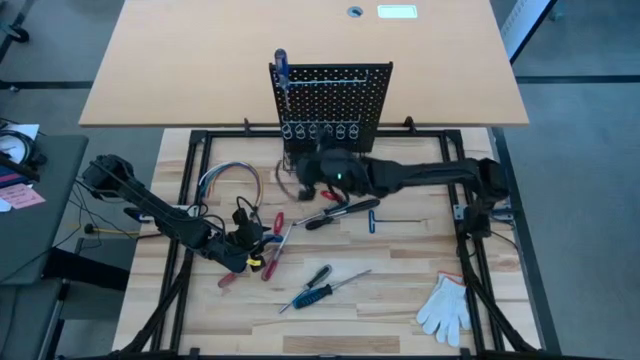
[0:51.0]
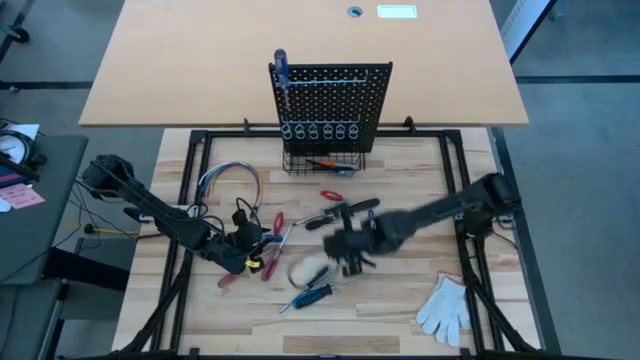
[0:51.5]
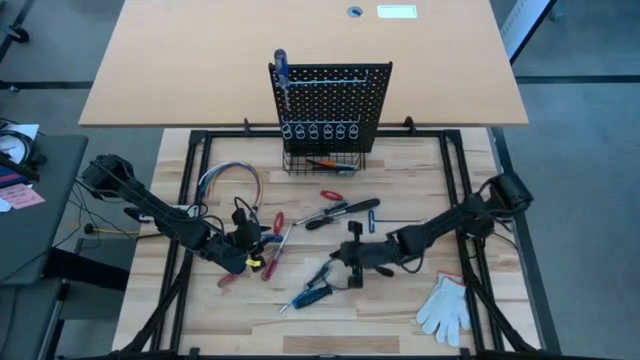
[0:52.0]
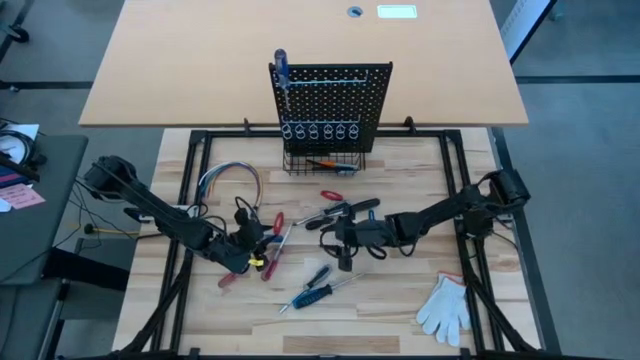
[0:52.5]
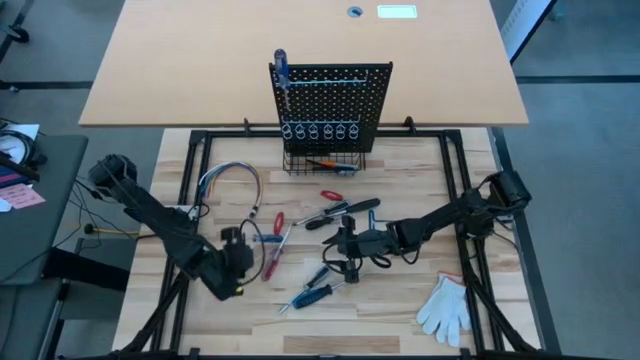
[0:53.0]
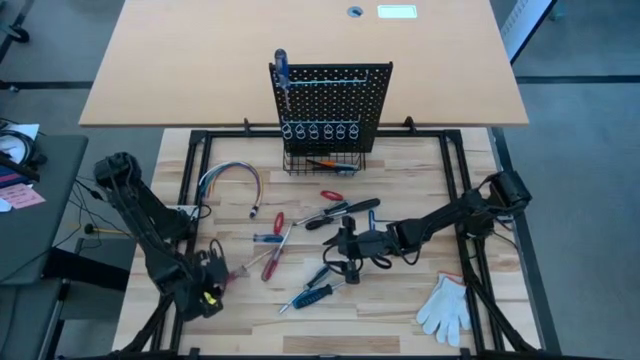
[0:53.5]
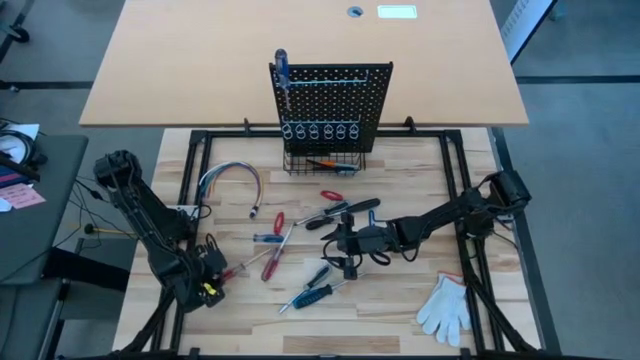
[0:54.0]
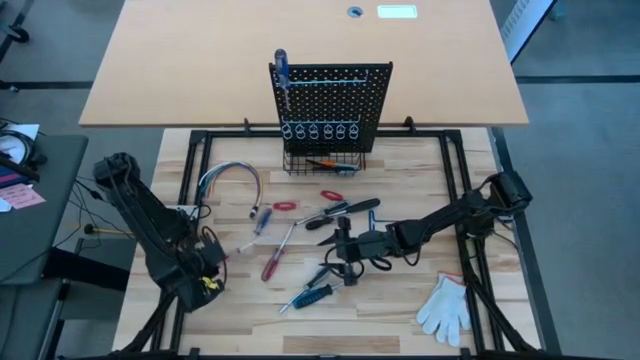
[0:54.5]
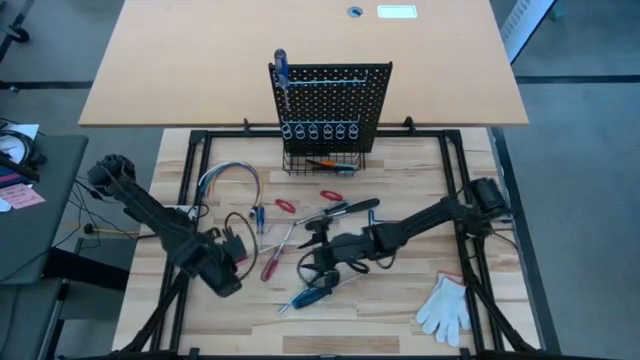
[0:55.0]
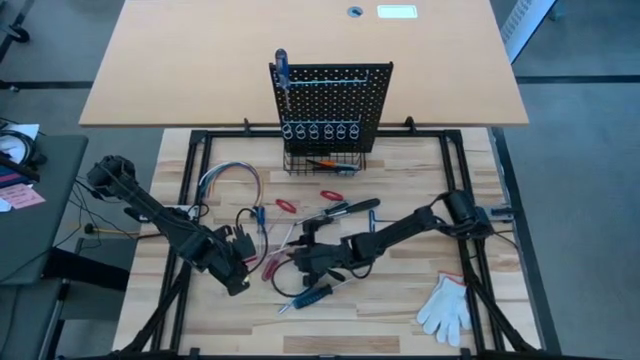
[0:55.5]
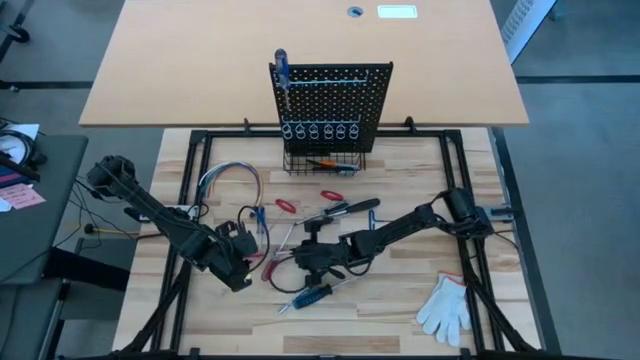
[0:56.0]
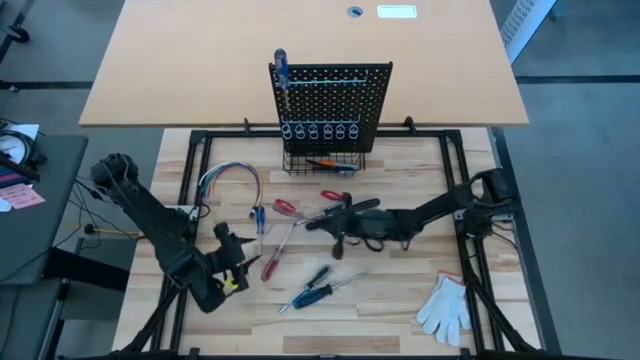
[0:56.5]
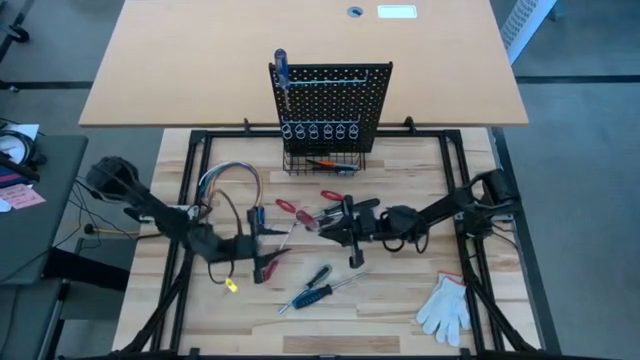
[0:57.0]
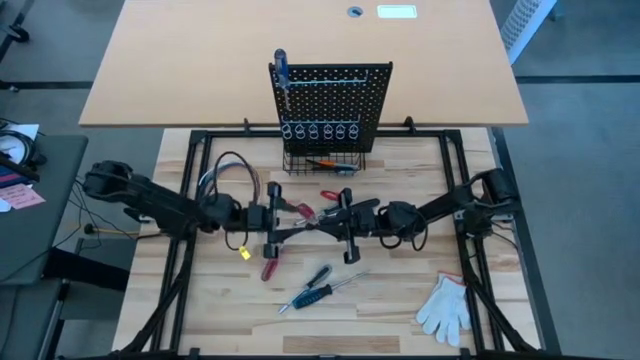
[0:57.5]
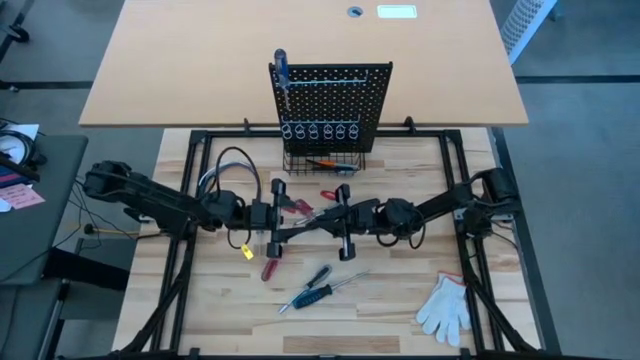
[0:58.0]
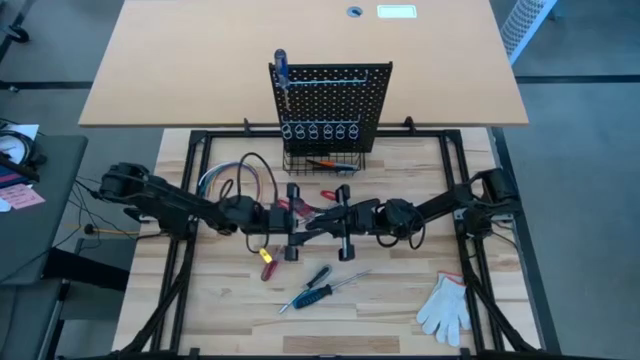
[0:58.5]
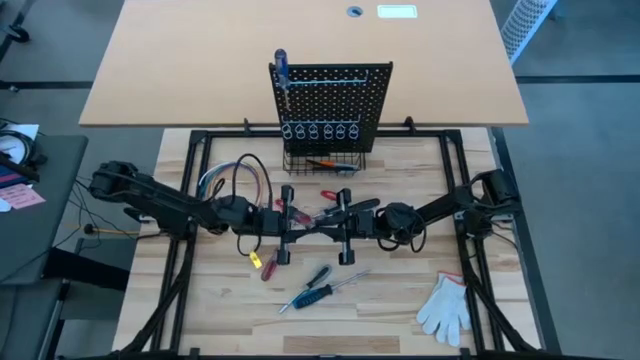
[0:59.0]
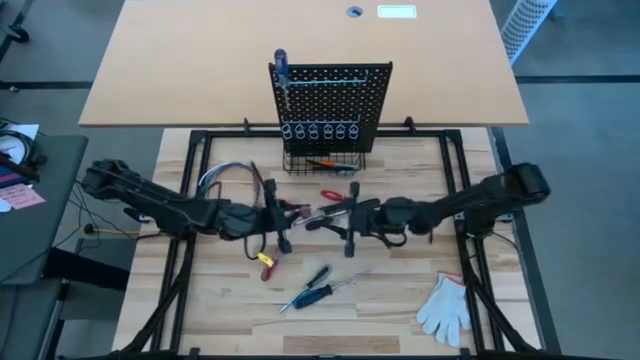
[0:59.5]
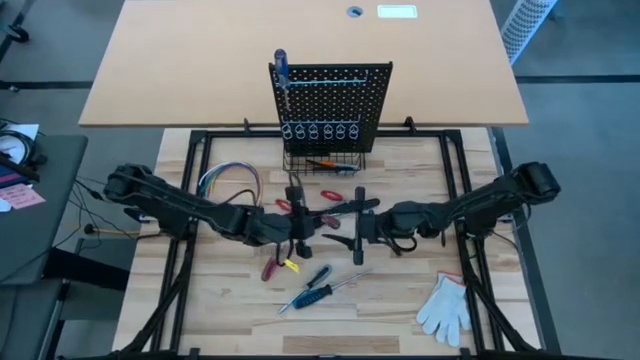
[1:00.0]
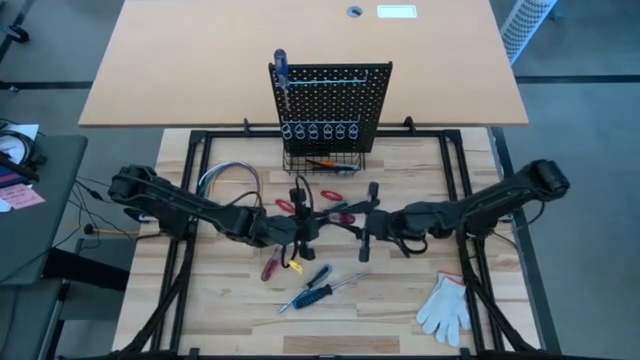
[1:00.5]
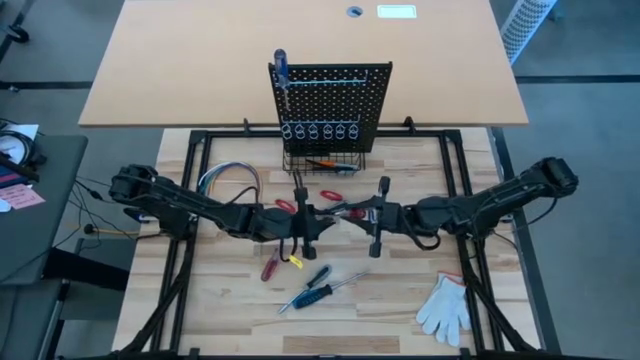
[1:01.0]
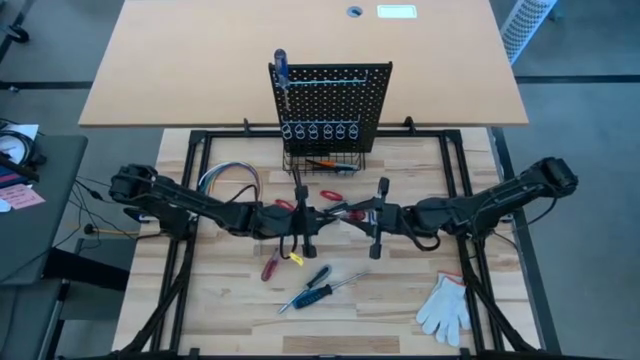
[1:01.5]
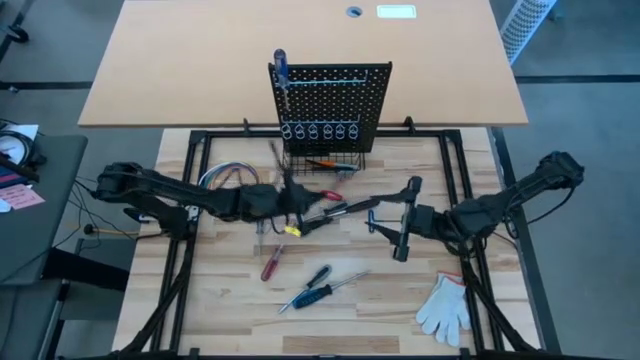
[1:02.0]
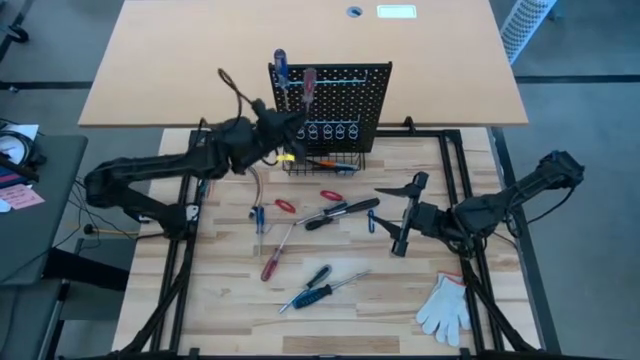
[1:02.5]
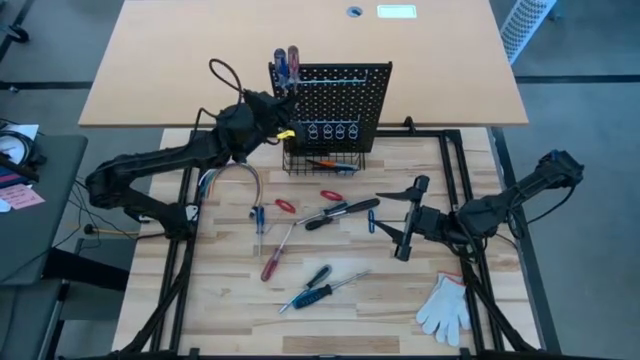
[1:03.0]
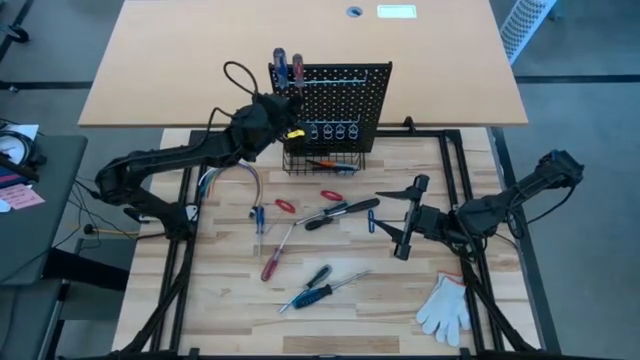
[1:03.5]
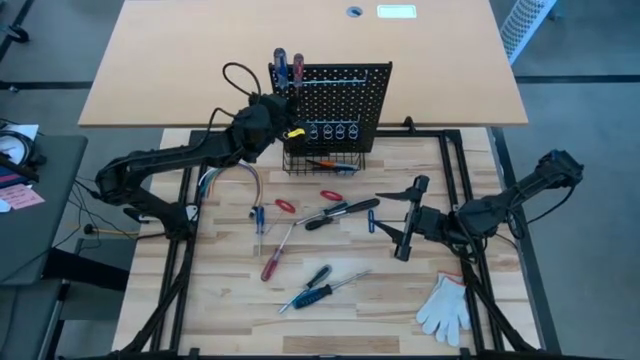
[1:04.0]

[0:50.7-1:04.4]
Task: Hang tools onto peg board
Hang the bottom red screwdriver on the pegboard

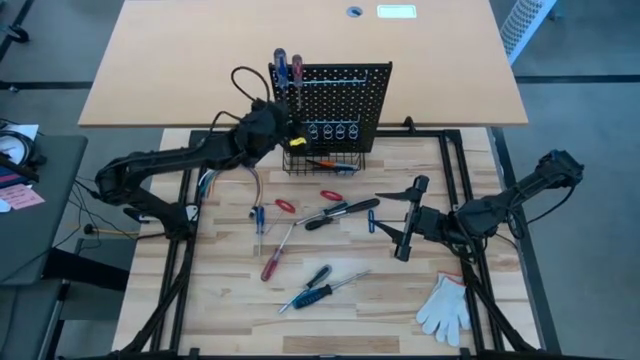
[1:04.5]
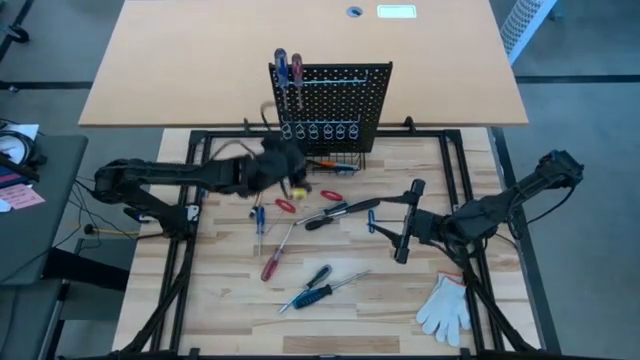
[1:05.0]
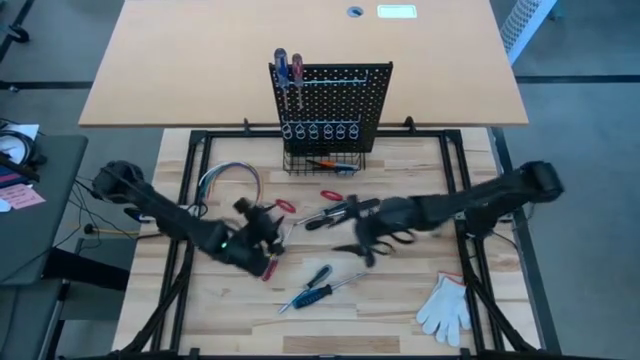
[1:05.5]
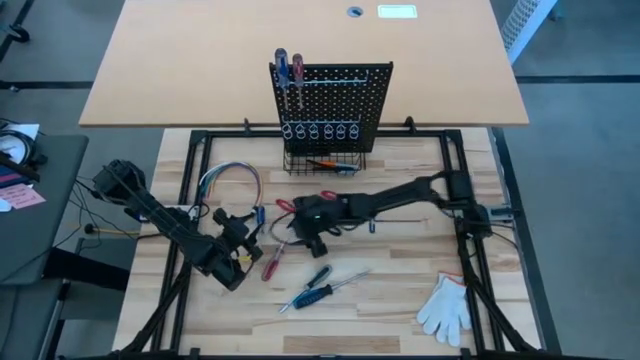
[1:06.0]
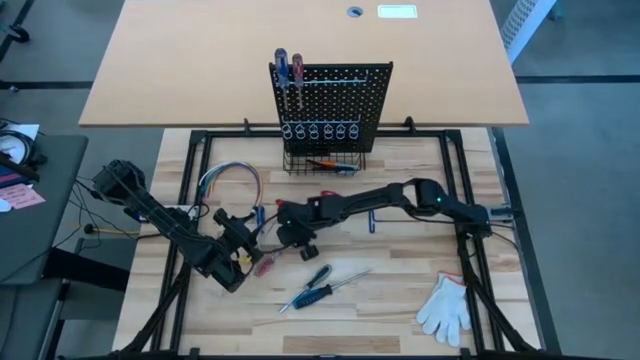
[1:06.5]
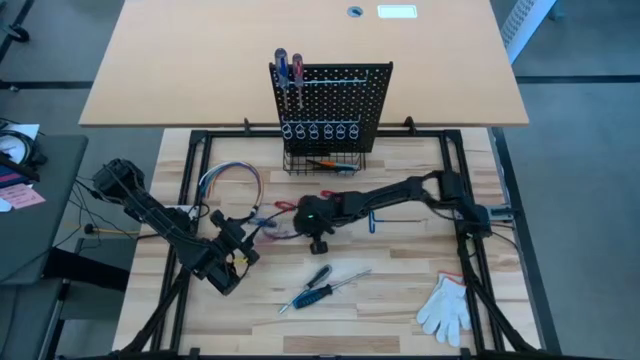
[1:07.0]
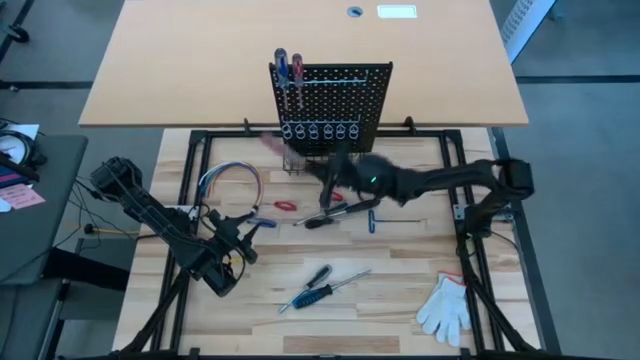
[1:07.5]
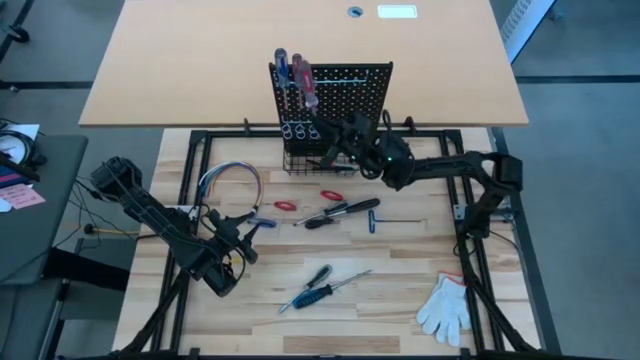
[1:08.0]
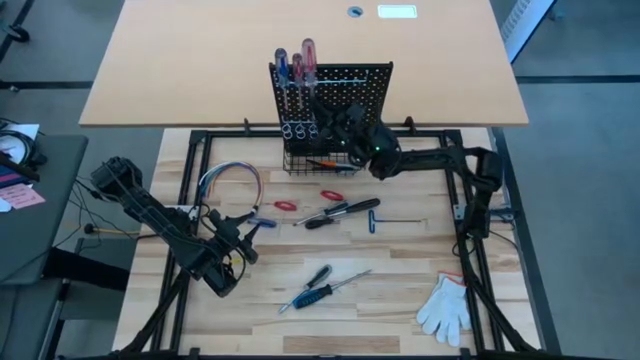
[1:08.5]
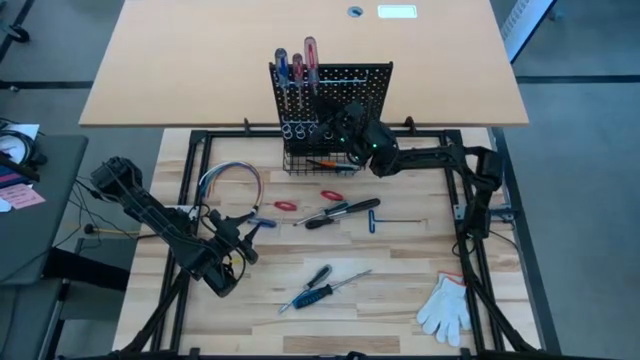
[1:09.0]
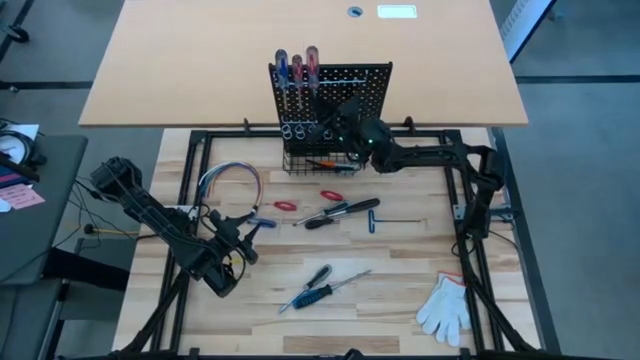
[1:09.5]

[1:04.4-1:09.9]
Hang the red screwdriver on the pegboard

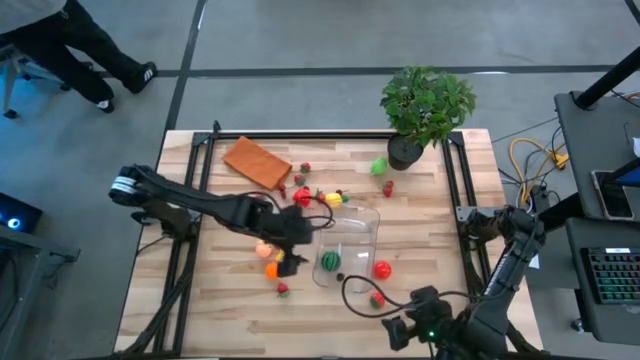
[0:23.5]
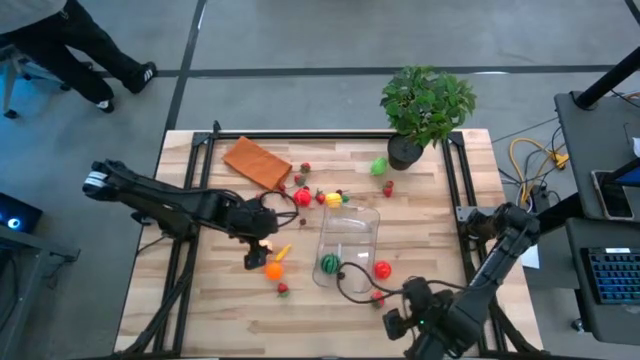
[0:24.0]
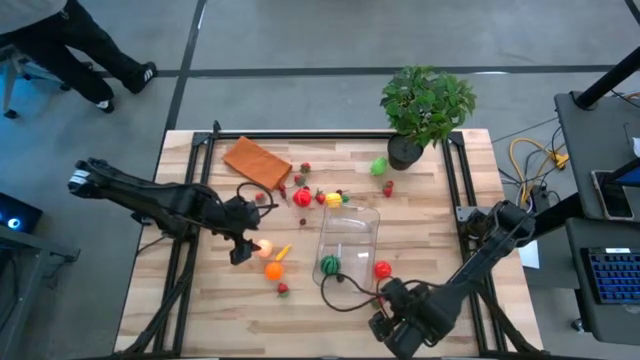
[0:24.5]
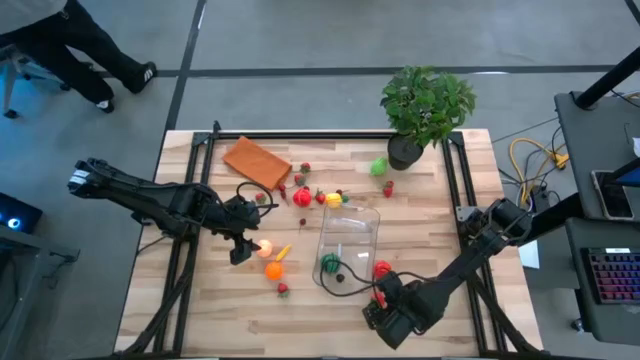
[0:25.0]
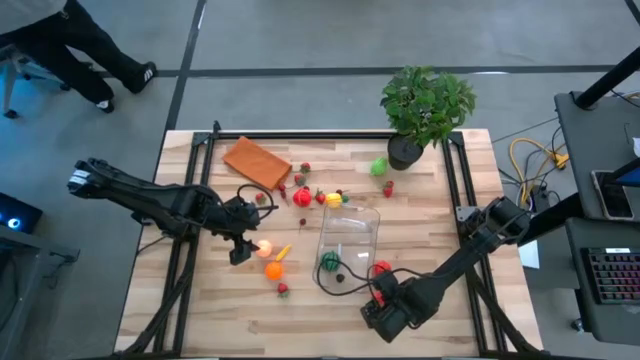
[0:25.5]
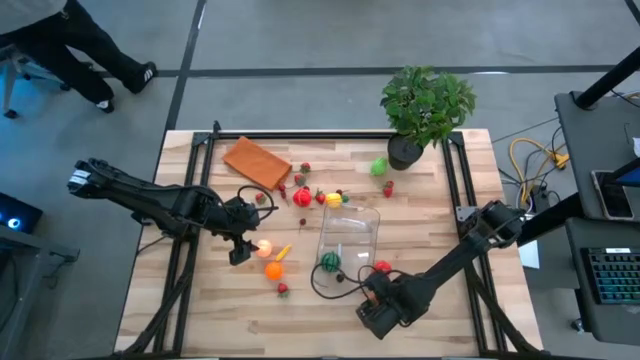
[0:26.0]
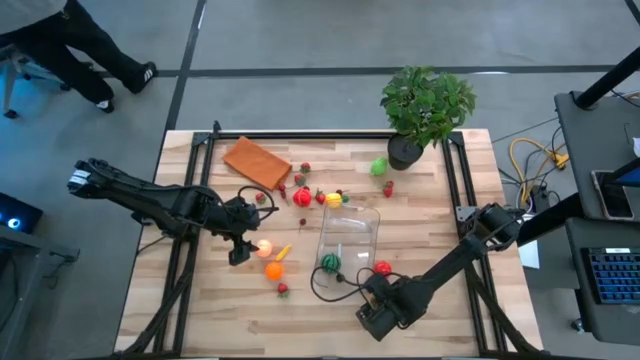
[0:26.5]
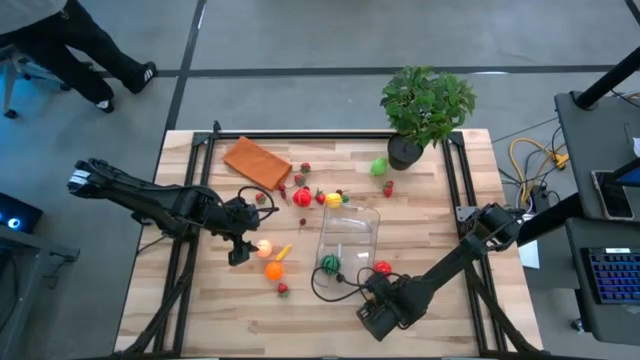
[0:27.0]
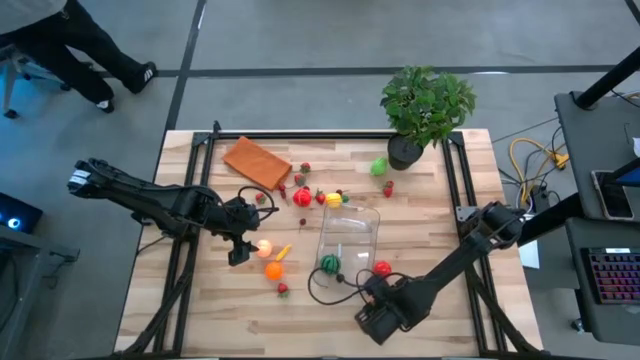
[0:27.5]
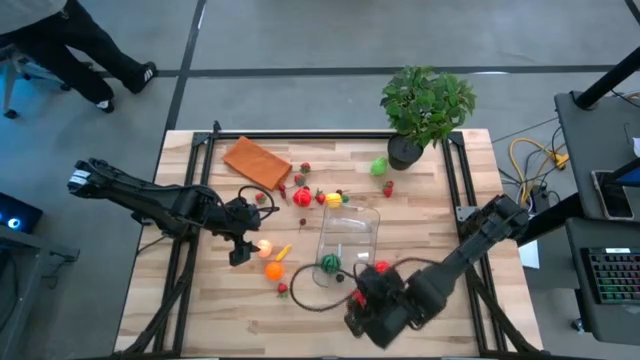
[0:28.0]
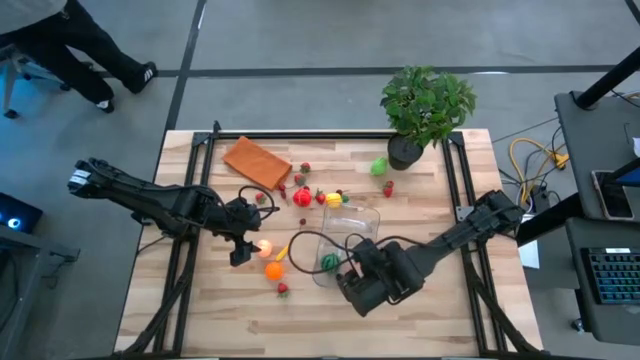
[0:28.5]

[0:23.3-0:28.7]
Task: Pick and placing Produce into tupperware
Put the strawberry into the transparent bin
